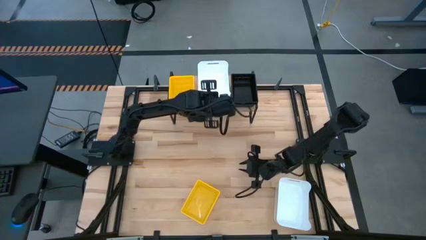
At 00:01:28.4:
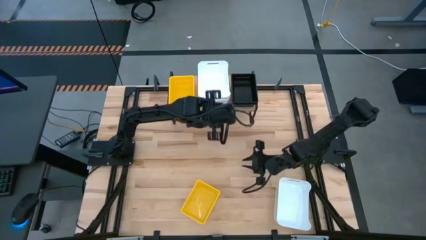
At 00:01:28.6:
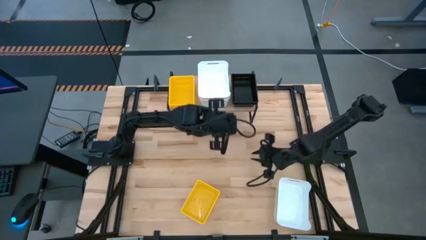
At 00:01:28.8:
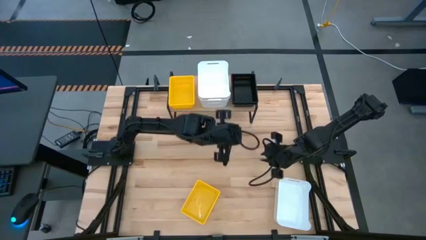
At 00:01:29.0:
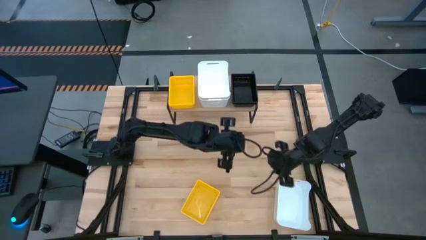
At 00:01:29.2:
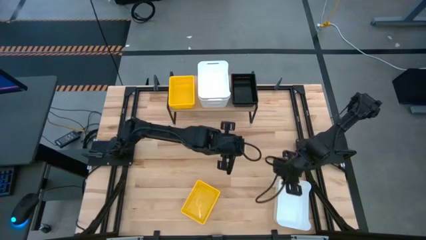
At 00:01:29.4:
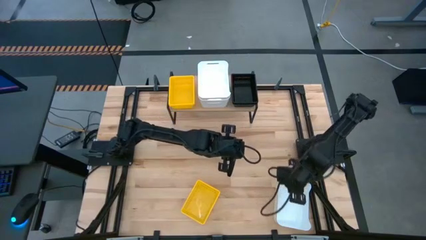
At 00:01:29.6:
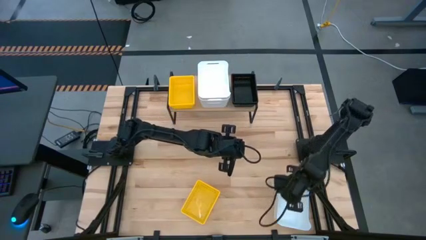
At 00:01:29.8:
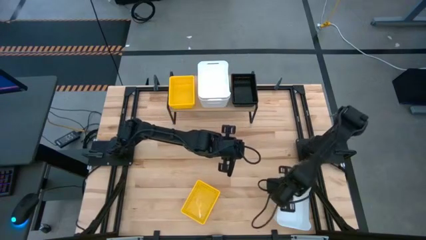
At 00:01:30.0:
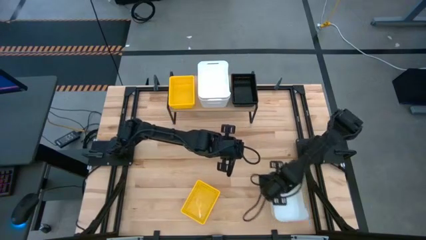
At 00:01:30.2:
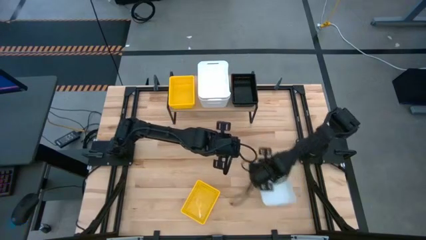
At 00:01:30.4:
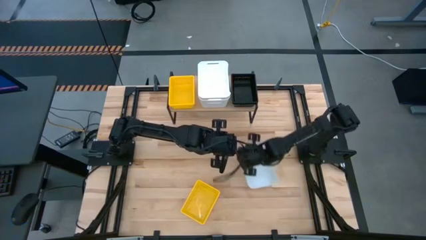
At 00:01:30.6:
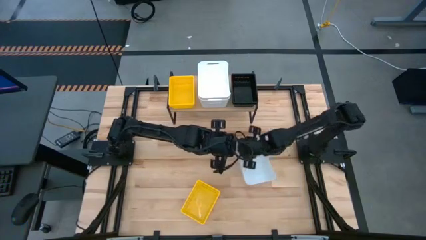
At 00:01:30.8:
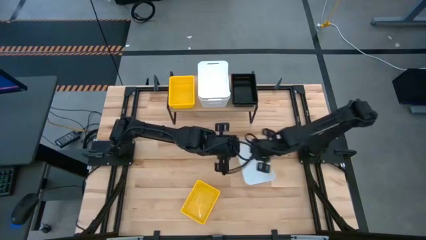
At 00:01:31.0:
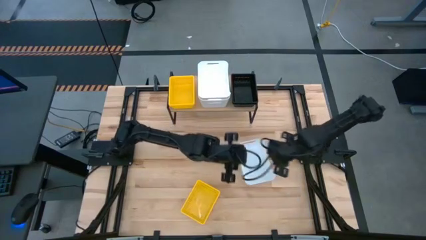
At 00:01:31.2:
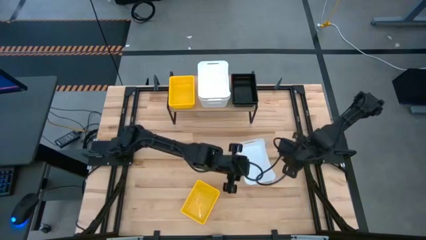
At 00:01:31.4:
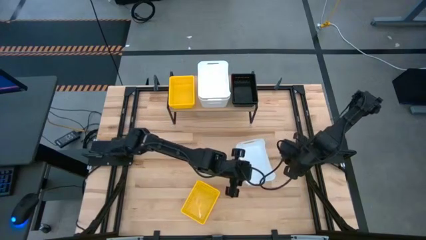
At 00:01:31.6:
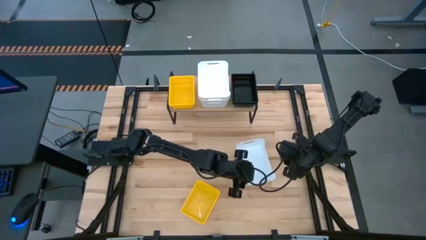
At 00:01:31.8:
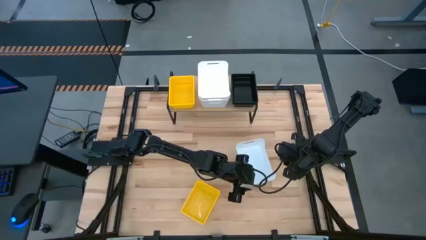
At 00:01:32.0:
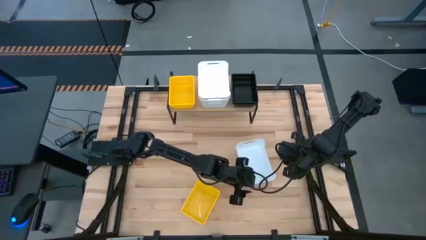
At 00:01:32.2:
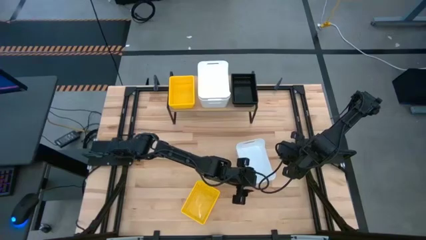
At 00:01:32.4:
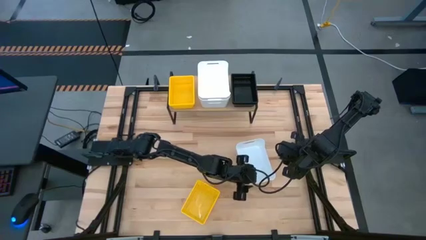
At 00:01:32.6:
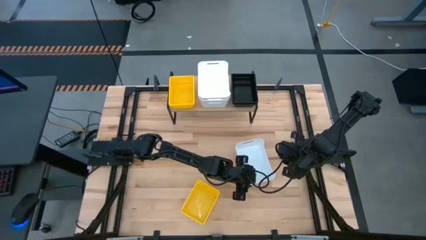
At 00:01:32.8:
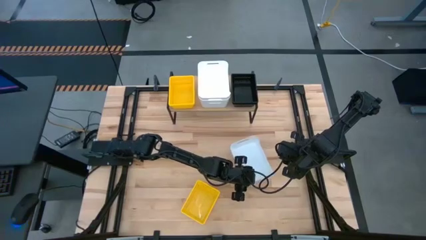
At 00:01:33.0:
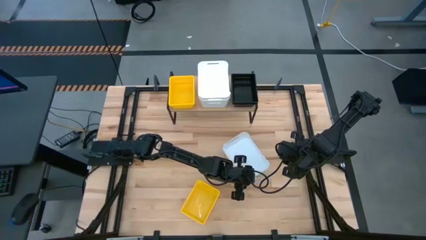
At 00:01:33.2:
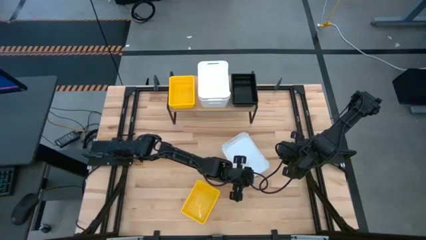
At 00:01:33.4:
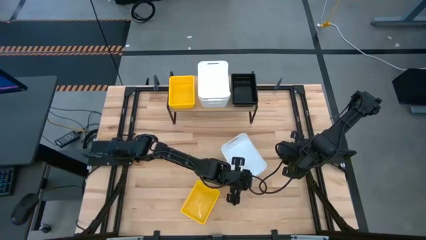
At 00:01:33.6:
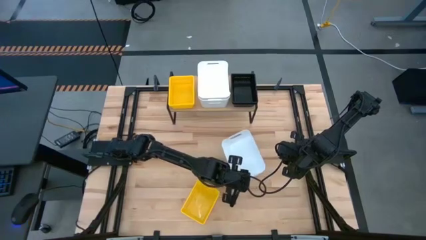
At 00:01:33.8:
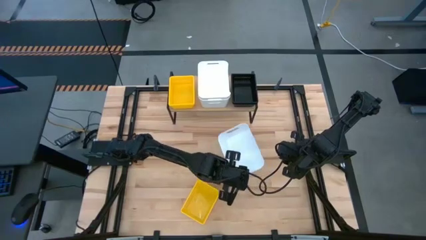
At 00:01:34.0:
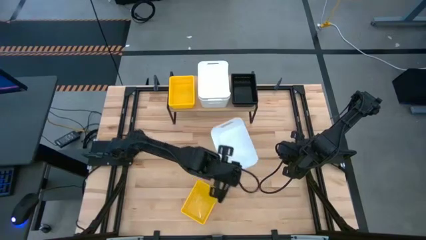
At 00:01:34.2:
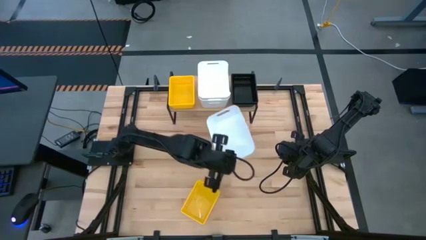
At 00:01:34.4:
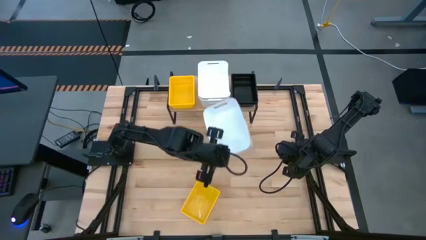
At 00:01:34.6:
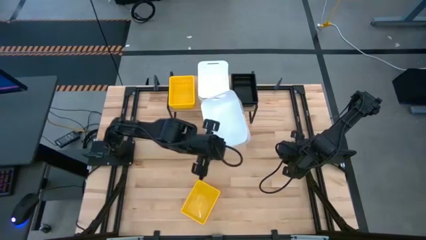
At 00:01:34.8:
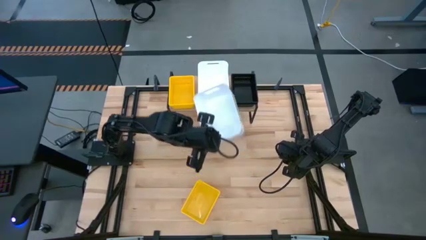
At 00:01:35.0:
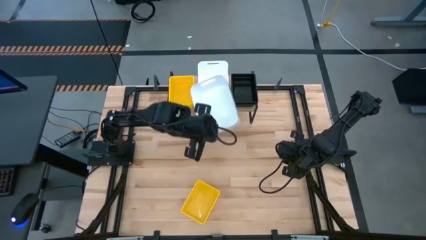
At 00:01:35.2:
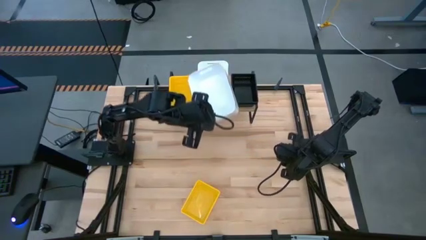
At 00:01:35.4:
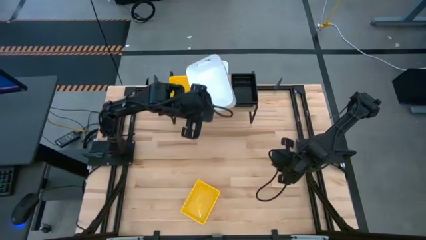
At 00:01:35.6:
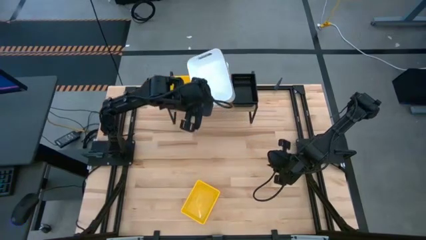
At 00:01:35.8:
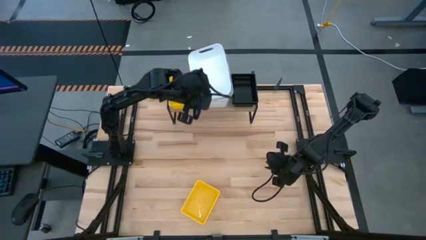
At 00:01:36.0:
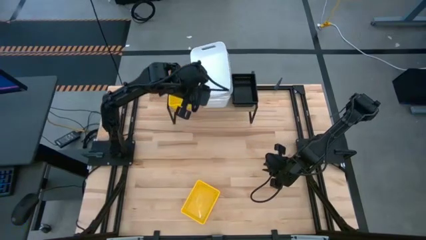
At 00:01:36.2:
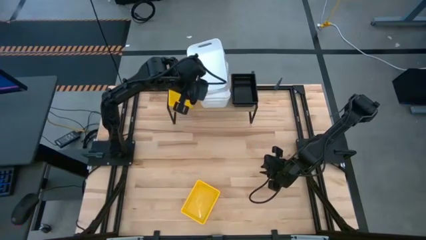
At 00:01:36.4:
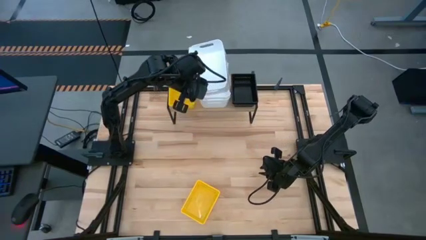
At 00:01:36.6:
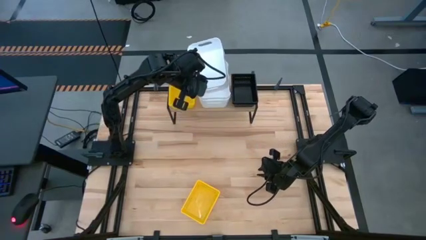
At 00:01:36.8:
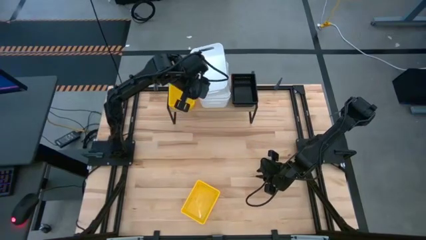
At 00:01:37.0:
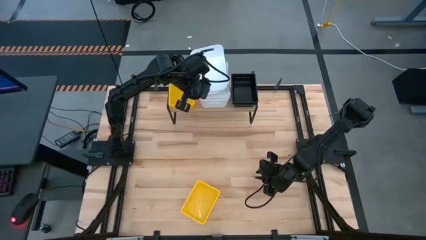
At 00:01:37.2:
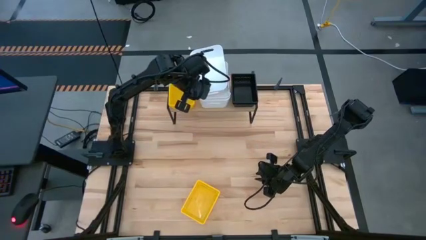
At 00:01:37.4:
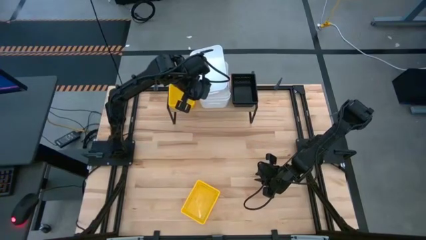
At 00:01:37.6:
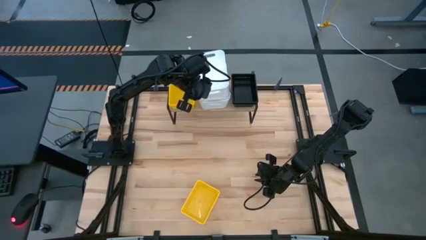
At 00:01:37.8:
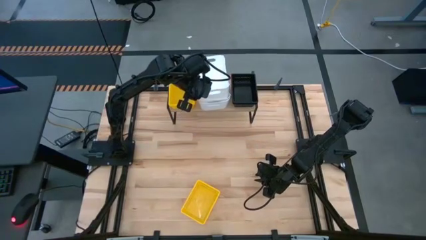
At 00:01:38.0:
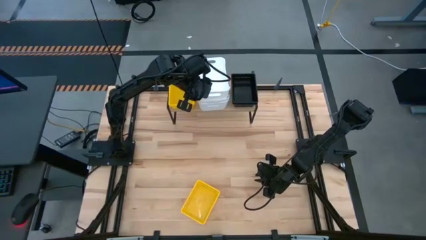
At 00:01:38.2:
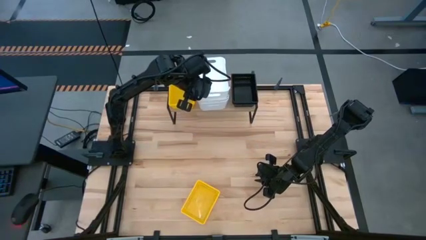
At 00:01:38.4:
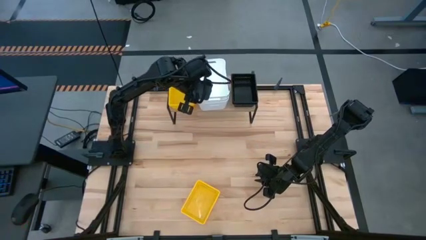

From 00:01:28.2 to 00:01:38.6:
Task: Stack baskets on shelf by color
Stack the white bin on the white bin on the shelf

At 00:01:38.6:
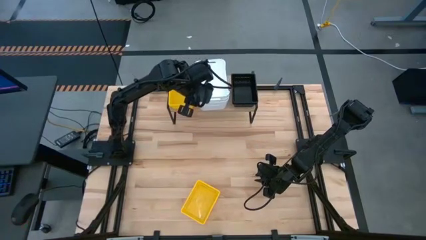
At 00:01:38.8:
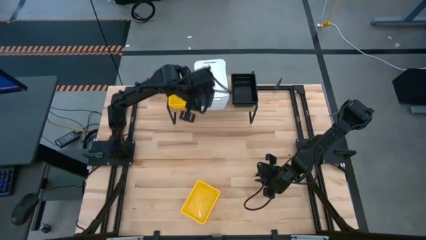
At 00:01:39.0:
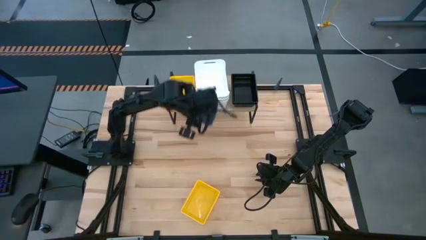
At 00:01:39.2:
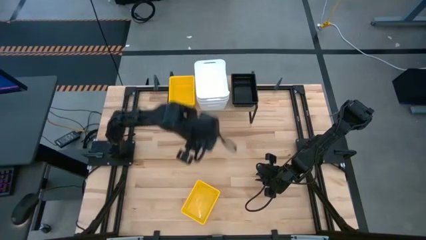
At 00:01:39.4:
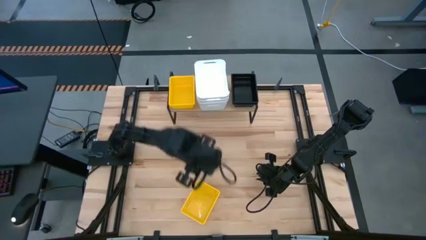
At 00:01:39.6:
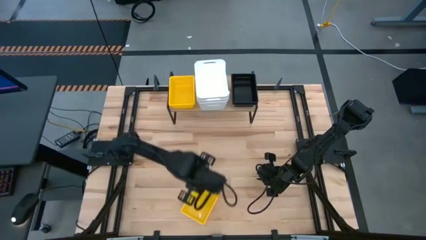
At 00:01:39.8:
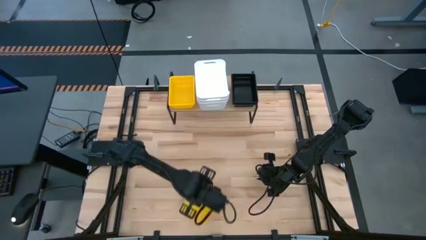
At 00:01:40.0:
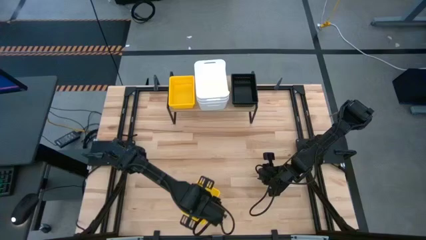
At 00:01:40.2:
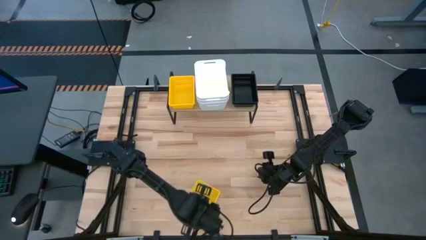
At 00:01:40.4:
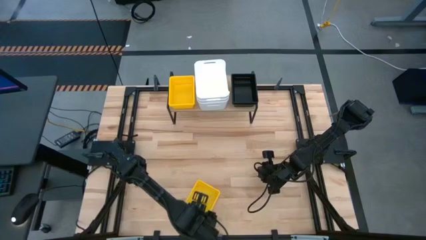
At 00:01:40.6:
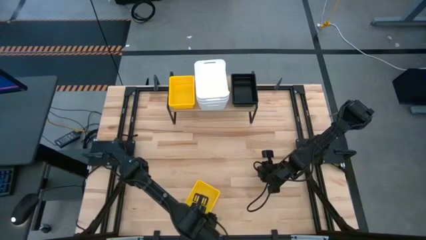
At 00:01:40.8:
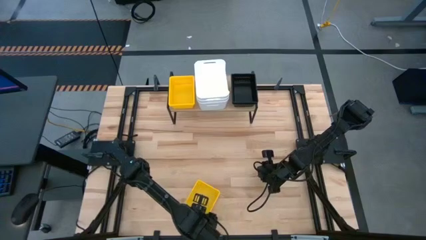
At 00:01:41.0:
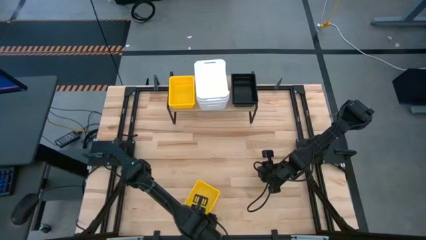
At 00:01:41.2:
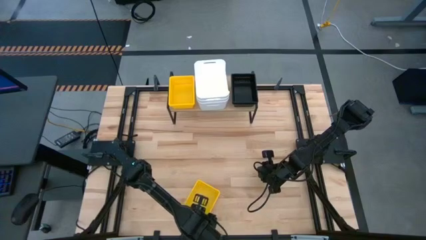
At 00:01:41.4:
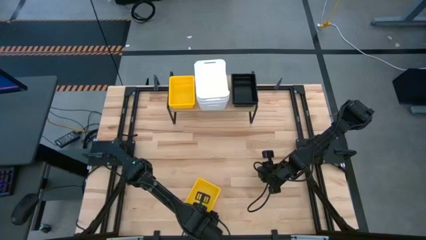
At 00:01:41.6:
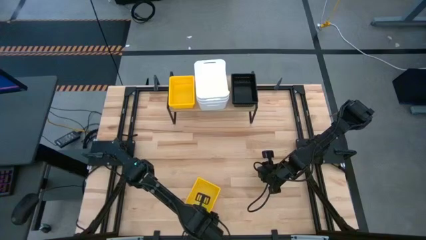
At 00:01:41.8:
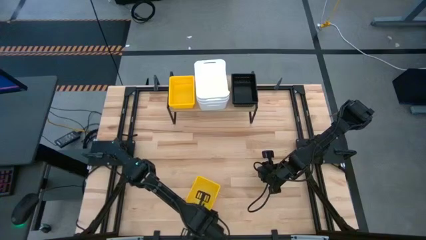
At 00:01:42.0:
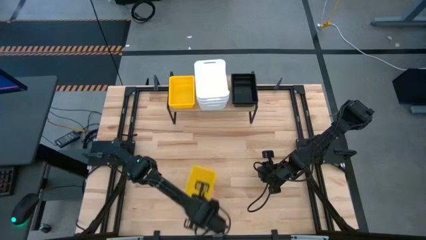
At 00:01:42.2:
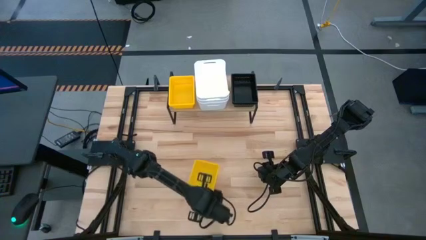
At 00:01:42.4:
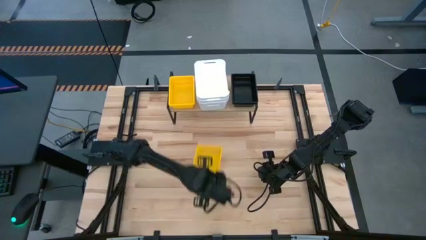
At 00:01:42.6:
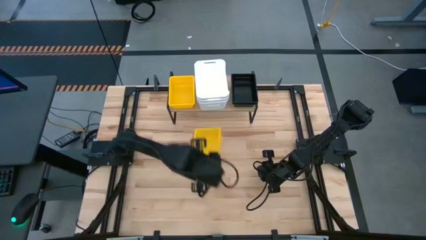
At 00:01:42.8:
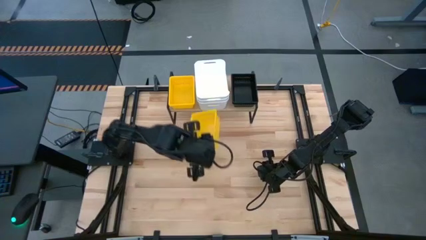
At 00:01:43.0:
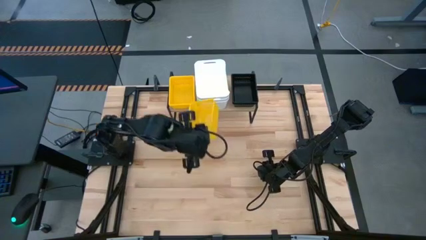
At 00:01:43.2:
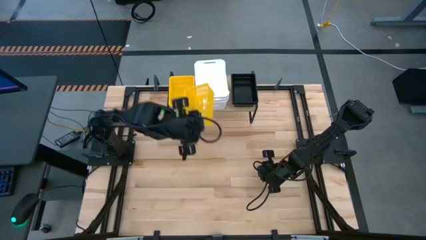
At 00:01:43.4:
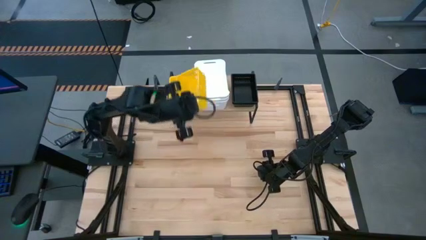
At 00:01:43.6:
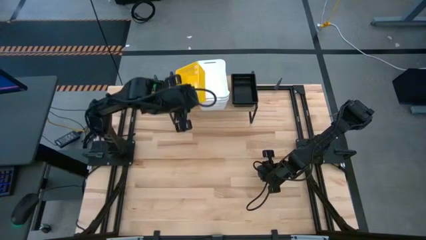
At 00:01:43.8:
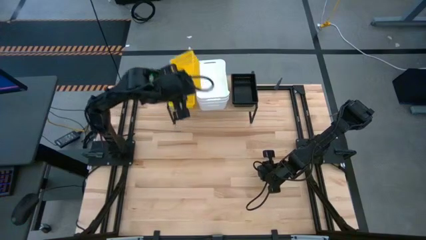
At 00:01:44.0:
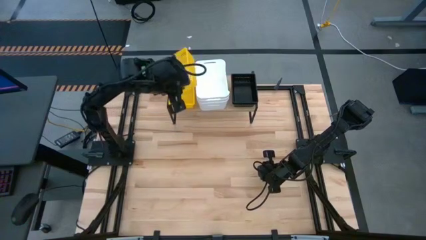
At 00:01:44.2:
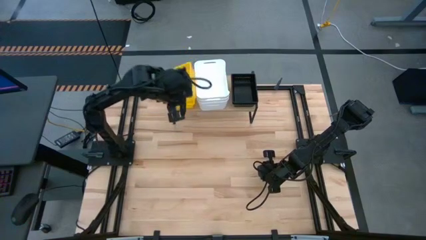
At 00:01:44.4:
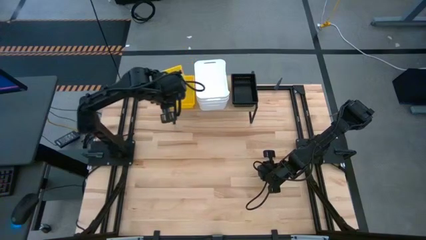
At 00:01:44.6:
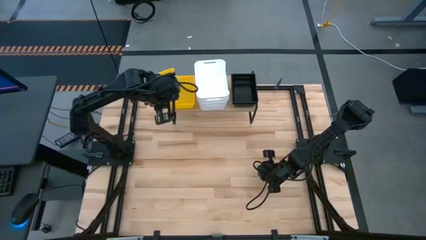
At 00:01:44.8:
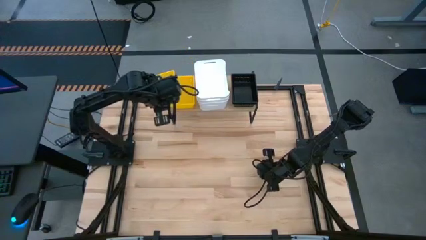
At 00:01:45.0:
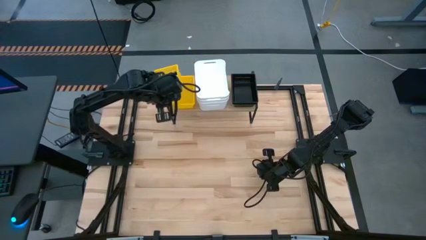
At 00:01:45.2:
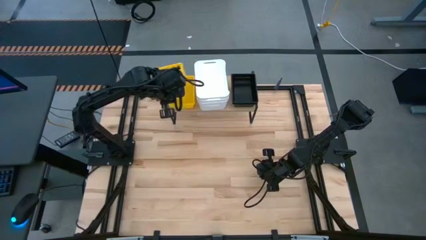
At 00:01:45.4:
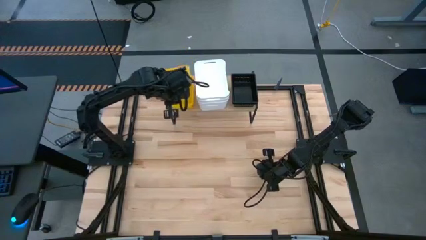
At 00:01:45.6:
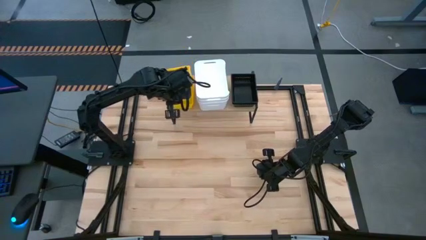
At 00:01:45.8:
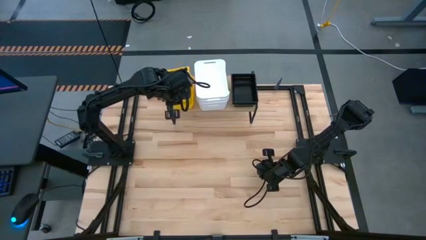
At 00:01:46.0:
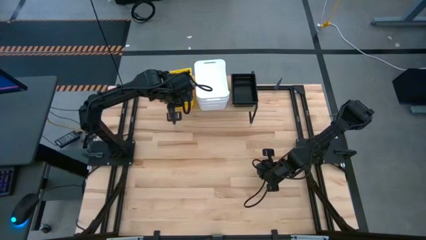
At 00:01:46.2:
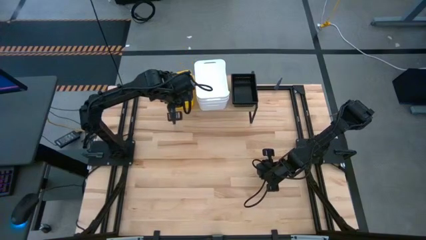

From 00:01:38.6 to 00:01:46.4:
Stack the yellow basket on the yellow basket on the shelf
